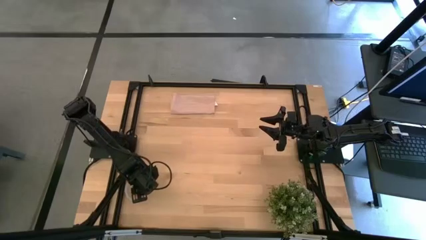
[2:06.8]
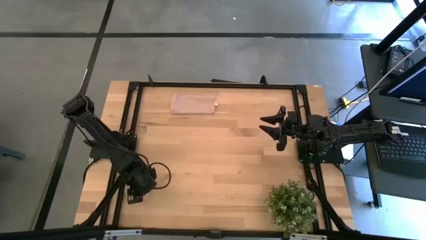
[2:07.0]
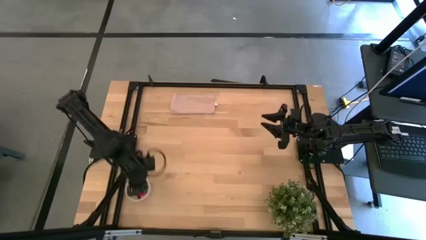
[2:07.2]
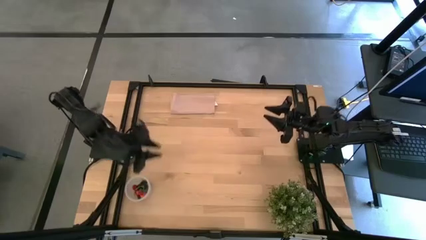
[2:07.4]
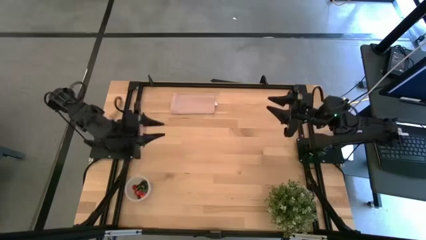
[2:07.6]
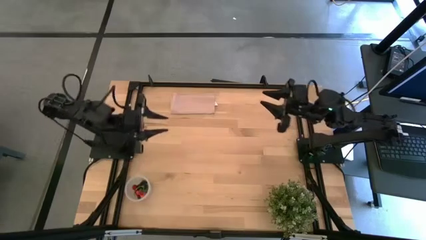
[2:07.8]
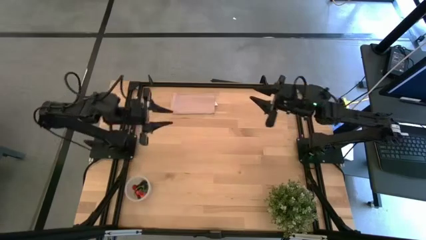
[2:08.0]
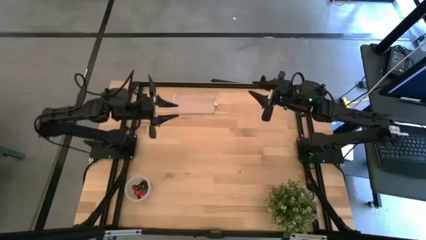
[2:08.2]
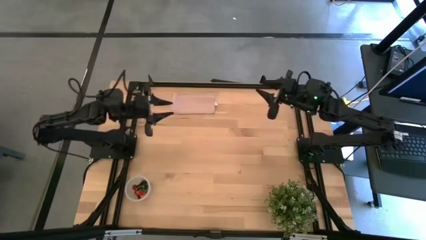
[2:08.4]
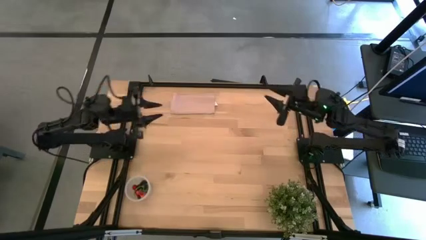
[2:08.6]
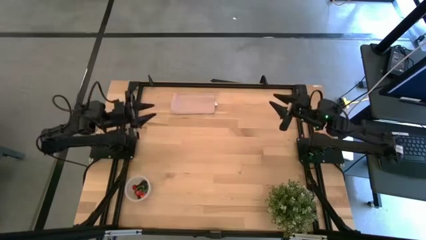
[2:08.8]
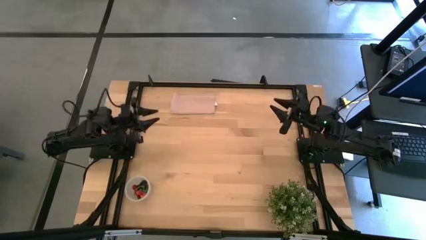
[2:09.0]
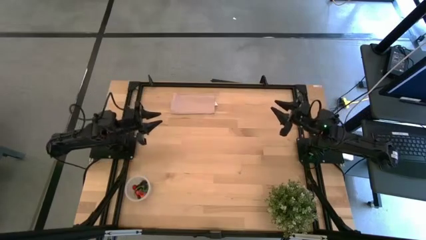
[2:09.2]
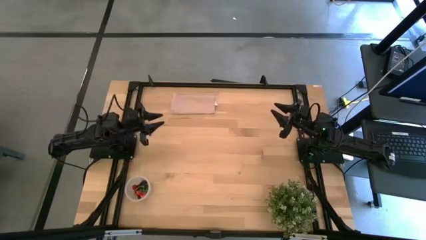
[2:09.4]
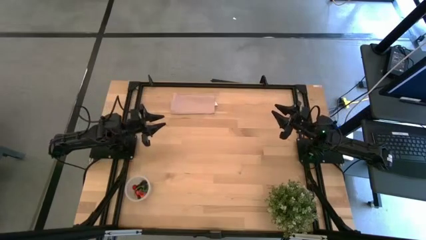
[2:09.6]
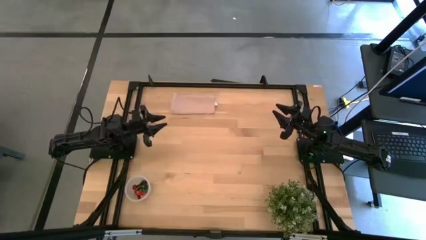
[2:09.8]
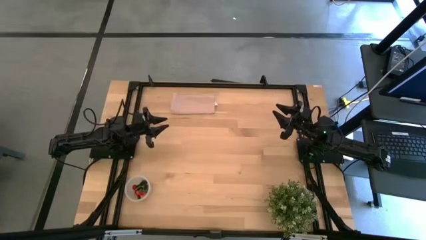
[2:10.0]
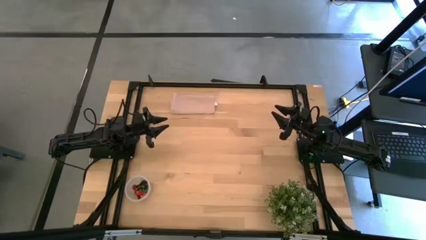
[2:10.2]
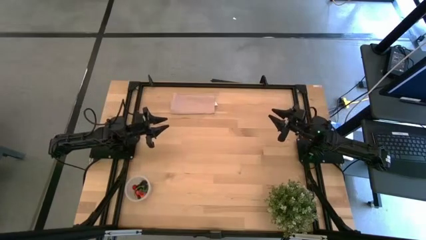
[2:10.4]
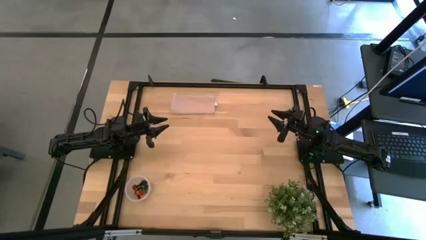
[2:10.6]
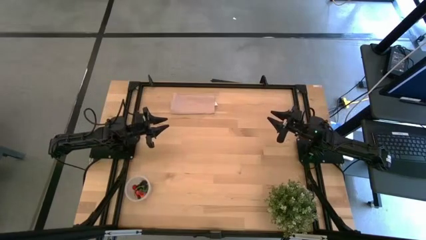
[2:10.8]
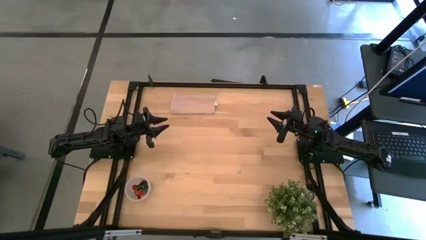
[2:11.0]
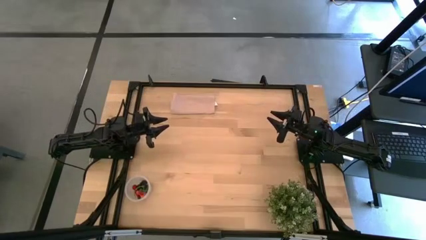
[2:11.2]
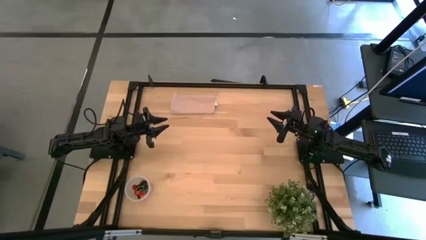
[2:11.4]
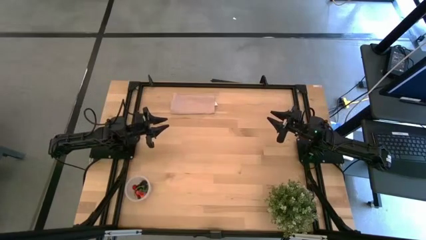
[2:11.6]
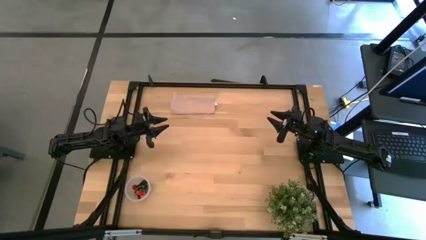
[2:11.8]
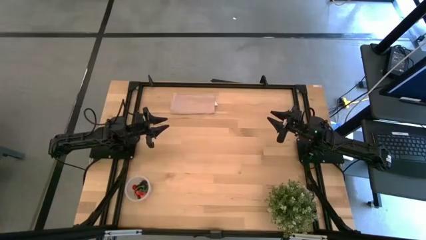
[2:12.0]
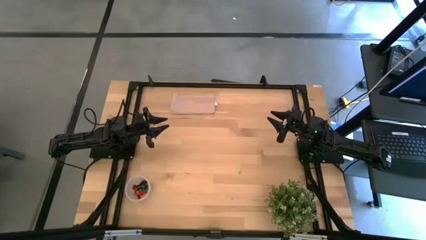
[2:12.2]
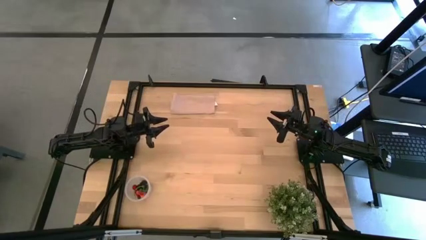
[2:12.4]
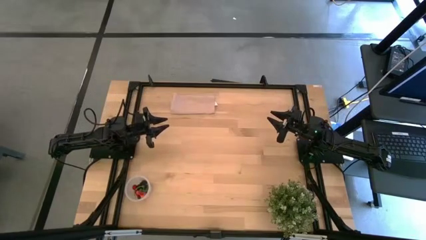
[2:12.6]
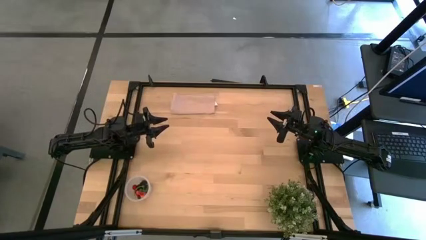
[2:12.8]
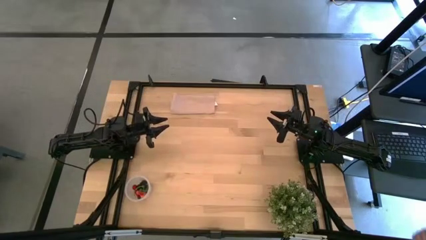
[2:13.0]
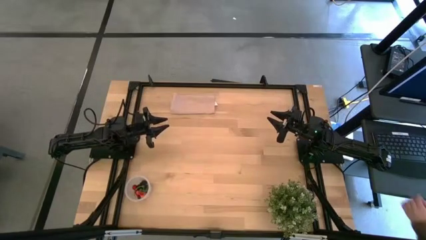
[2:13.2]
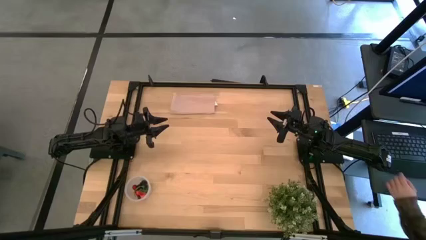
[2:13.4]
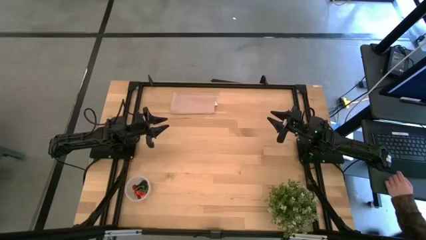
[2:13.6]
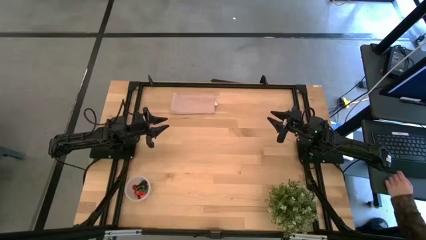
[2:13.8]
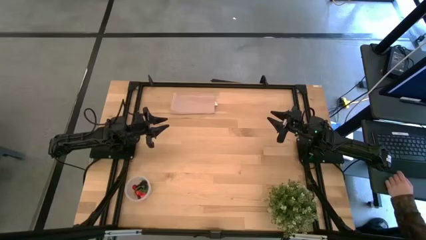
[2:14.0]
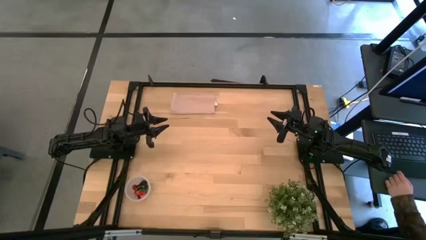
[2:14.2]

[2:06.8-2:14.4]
Task: Pick and placing Produce into tupperware
Return to Home Position
